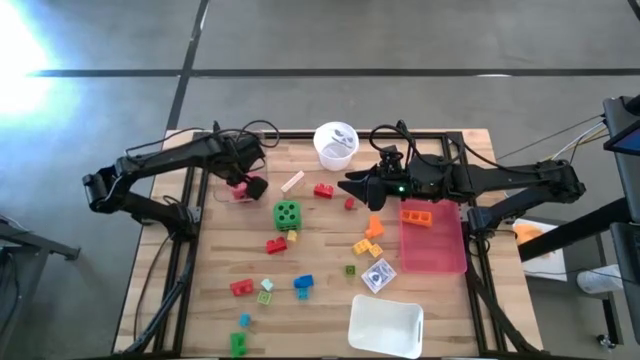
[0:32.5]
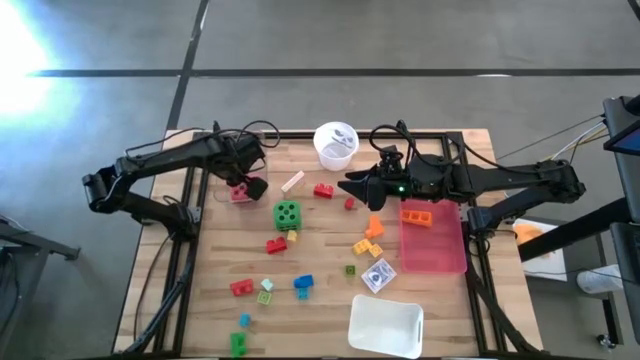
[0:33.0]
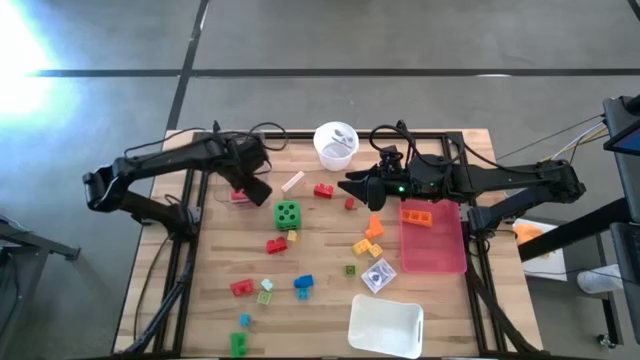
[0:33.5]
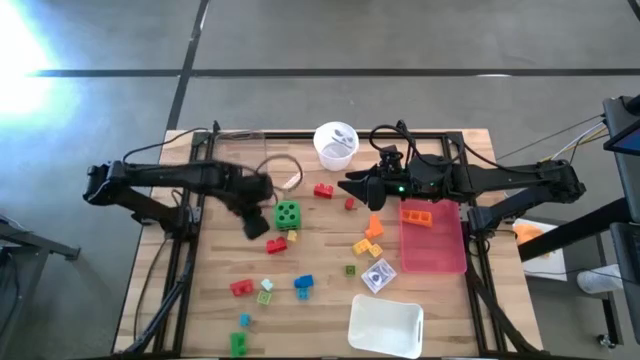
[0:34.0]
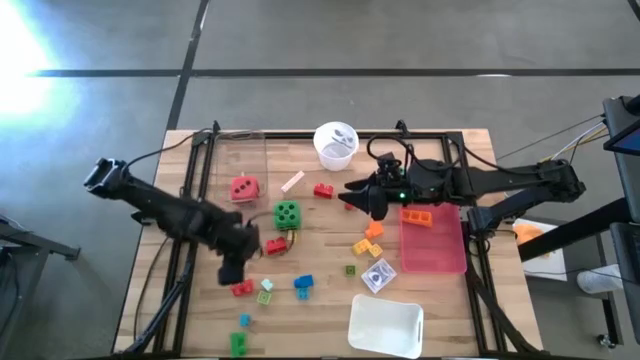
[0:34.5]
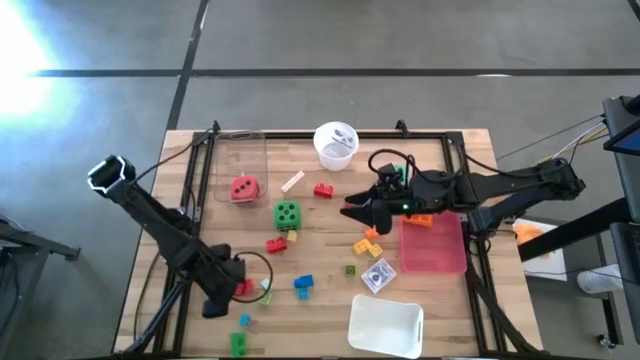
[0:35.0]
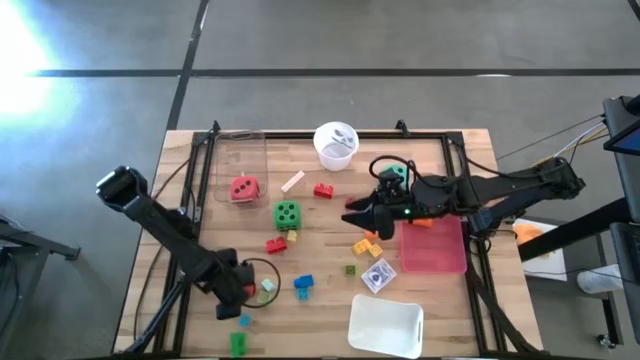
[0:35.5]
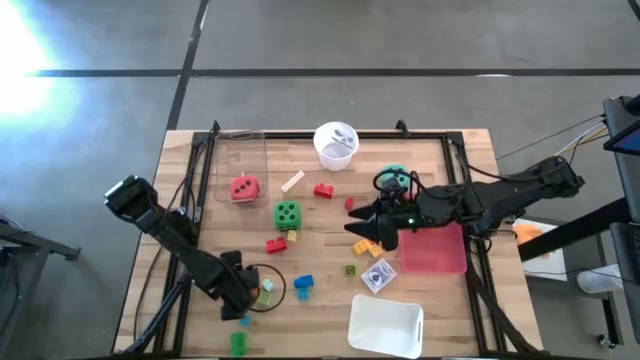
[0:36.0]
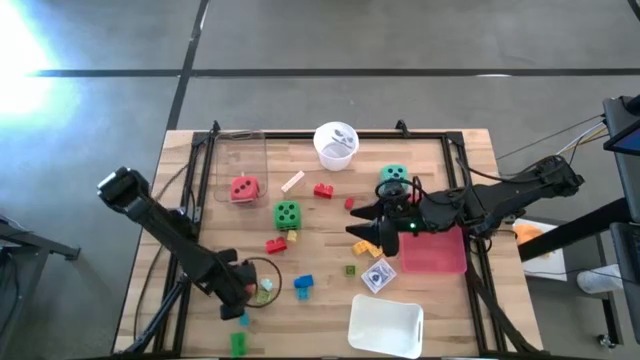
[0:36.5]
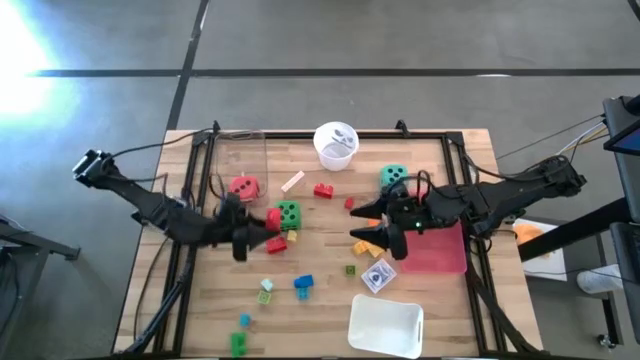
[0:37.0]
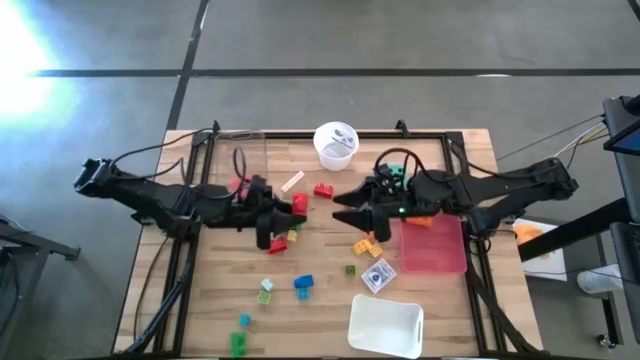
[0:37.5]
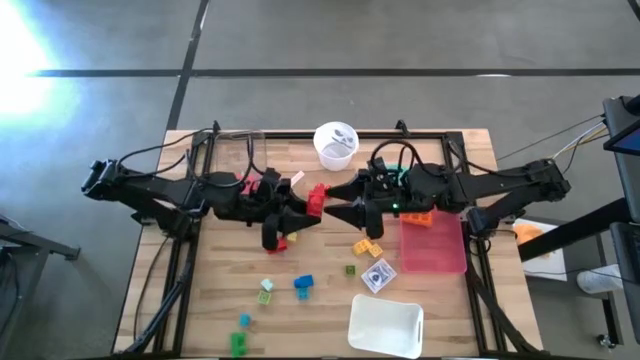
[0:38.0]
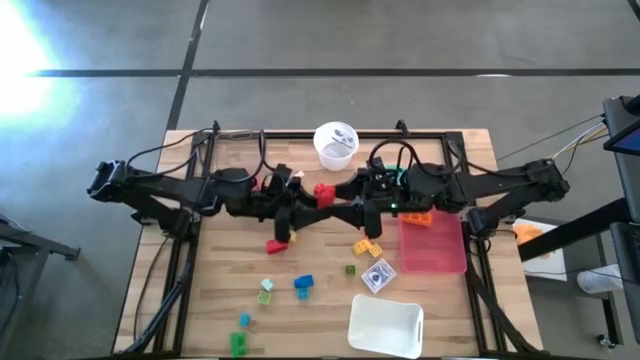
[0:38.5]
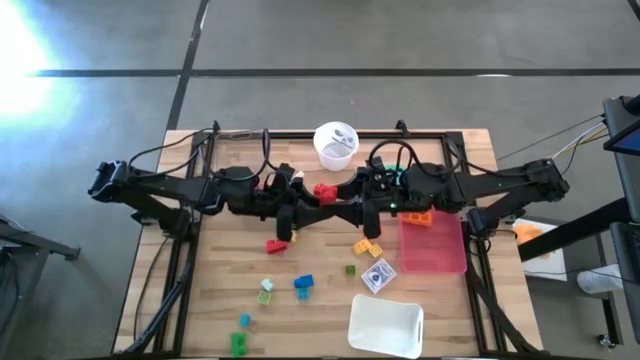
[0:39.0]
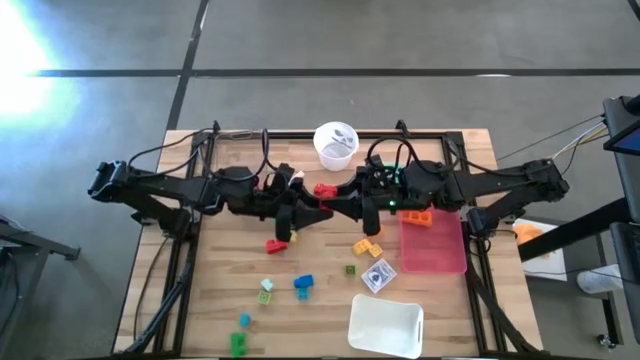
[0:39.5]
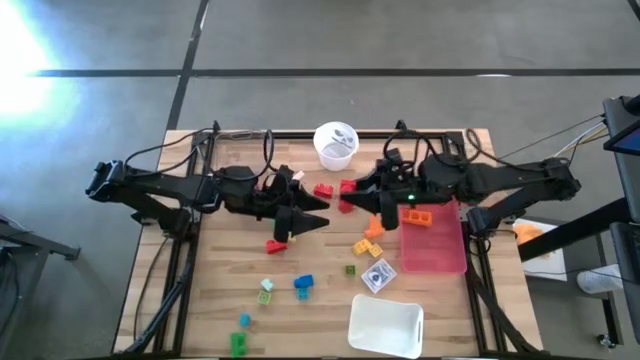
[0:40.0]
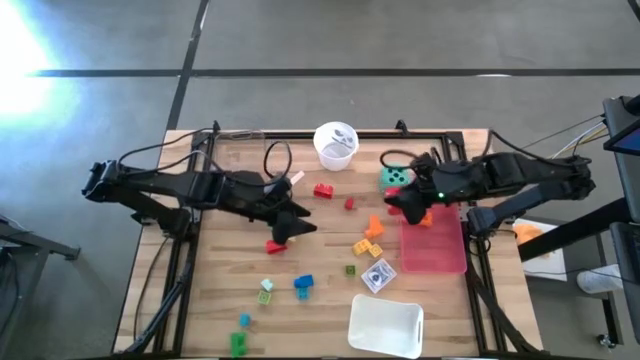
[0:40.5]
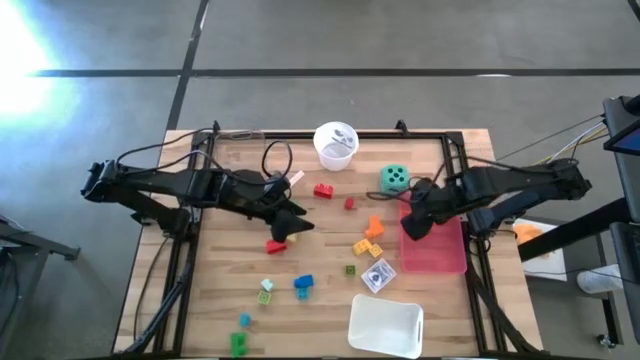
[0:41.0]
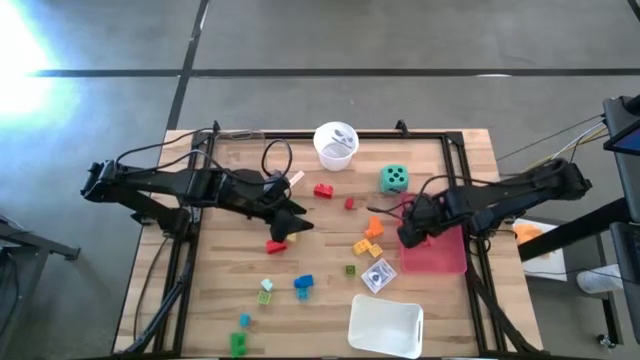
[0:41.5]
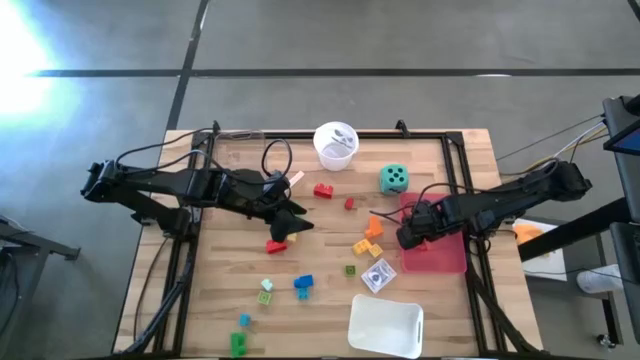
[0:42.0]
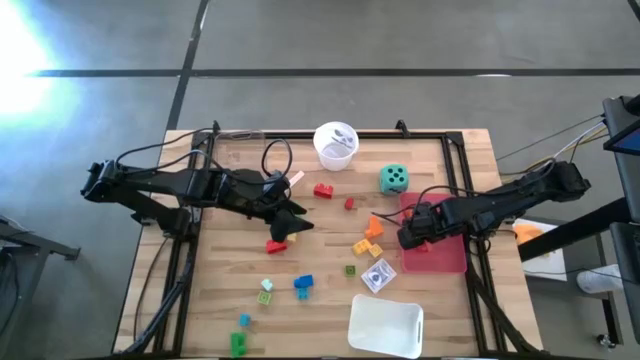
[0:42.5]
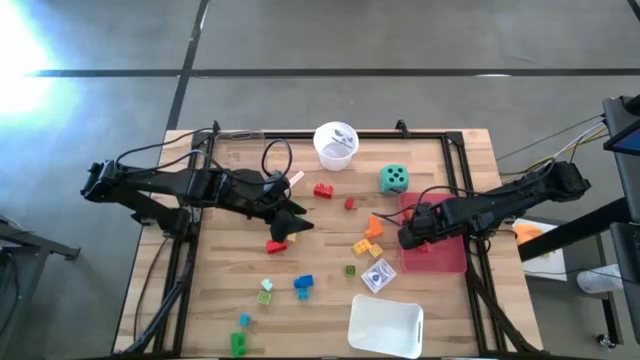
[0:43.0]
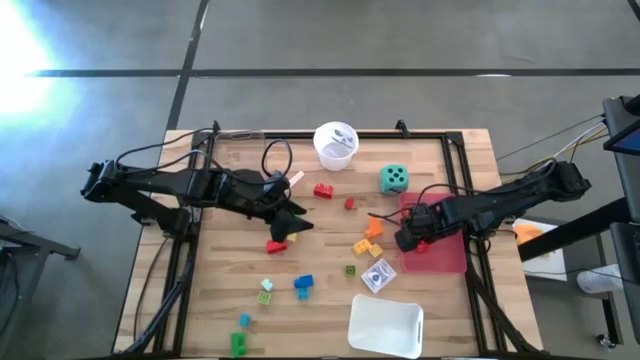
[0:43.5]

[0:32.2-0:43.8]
Task: Pick & Place Toys
Put the red game piece into the pink bin

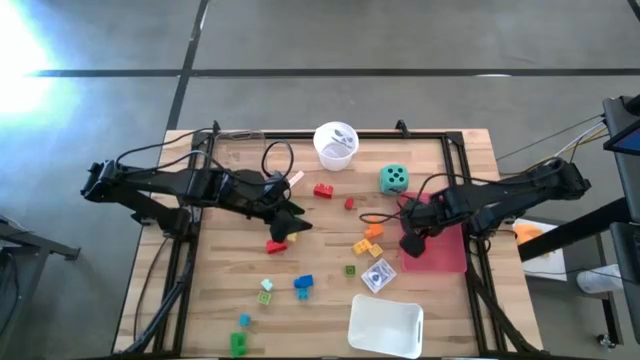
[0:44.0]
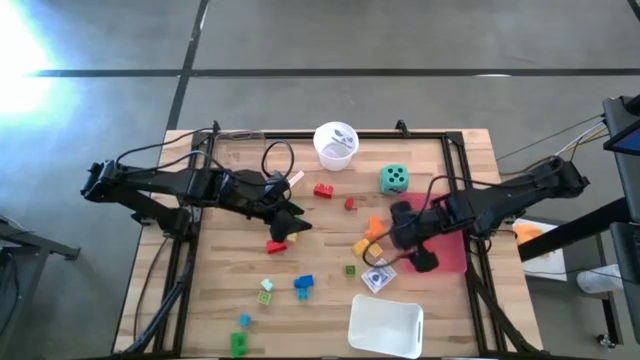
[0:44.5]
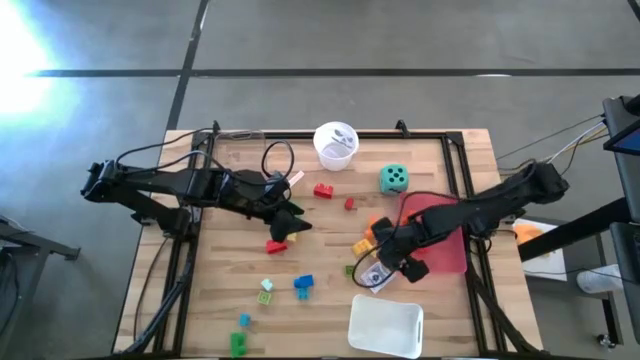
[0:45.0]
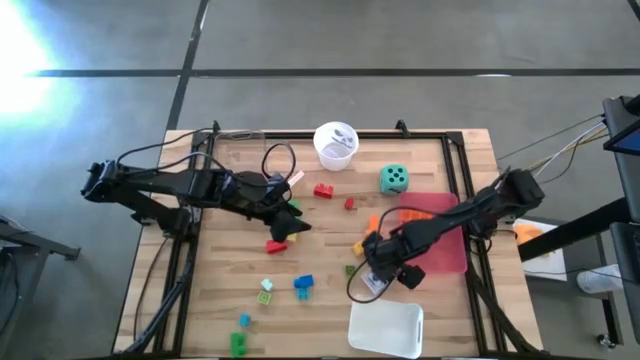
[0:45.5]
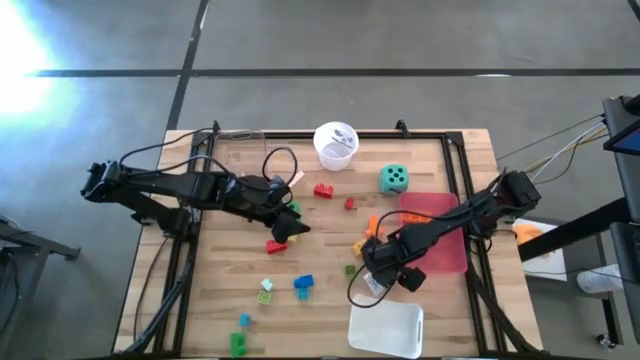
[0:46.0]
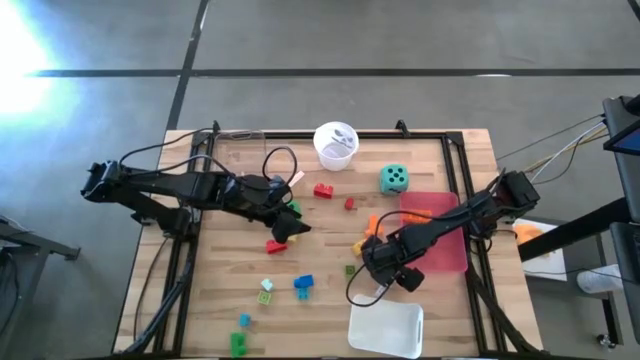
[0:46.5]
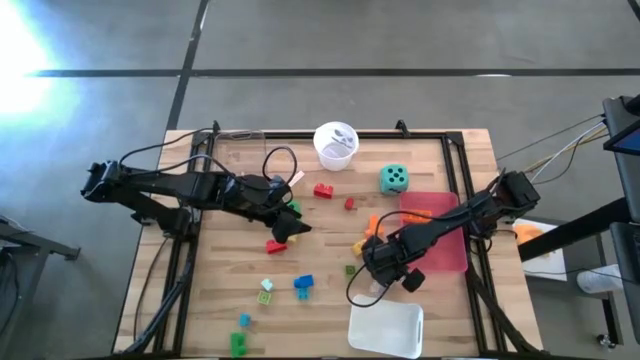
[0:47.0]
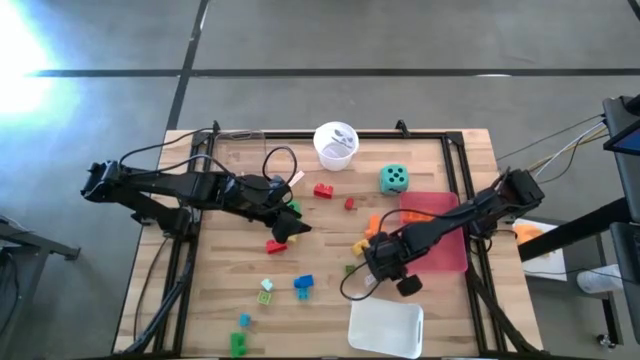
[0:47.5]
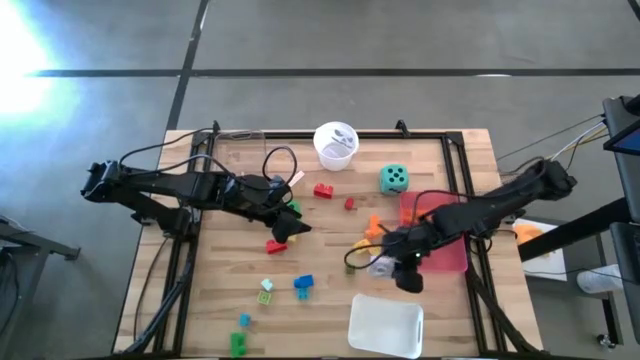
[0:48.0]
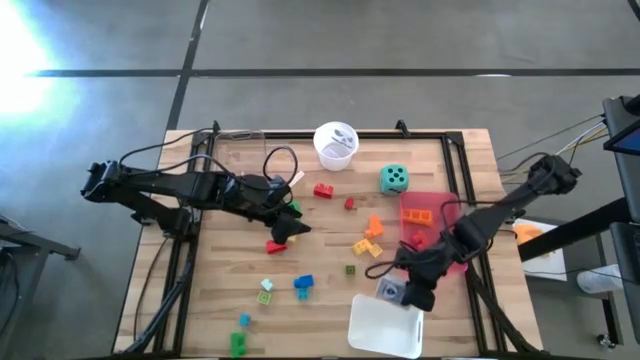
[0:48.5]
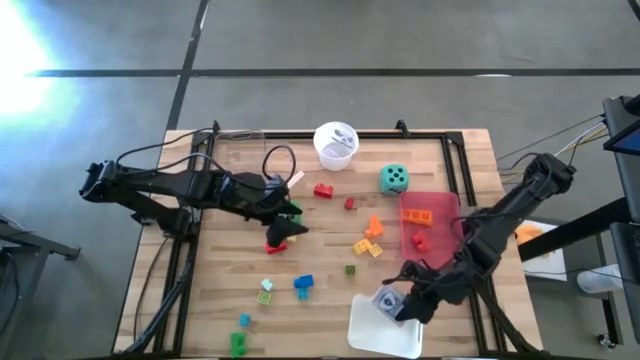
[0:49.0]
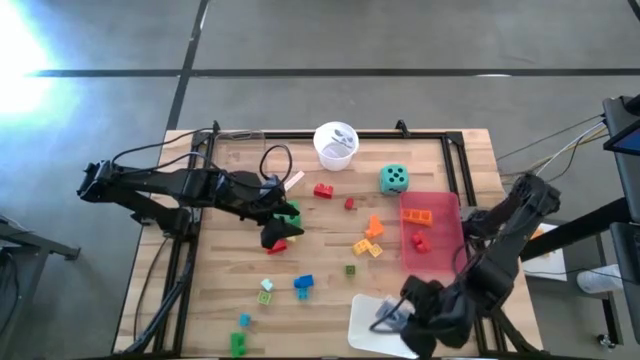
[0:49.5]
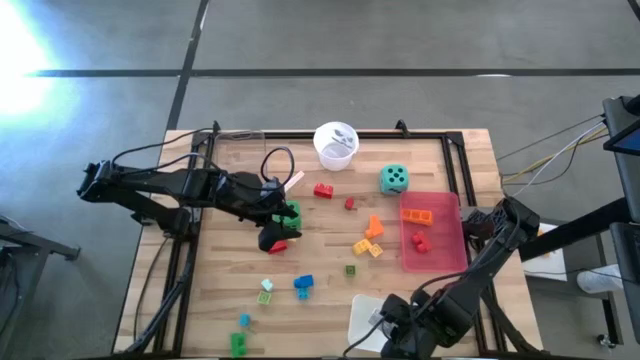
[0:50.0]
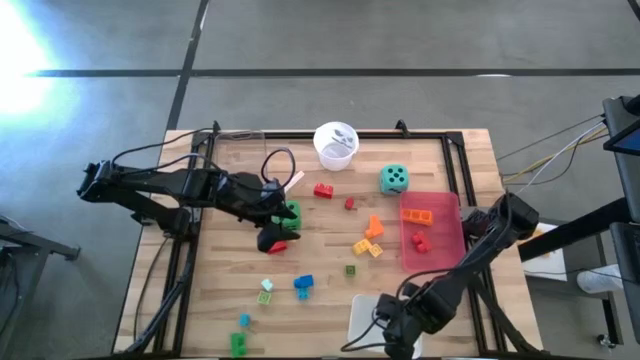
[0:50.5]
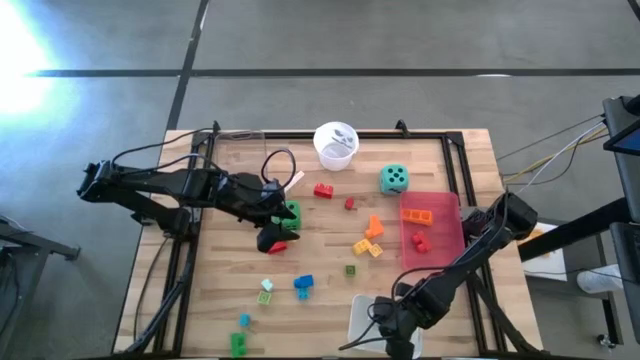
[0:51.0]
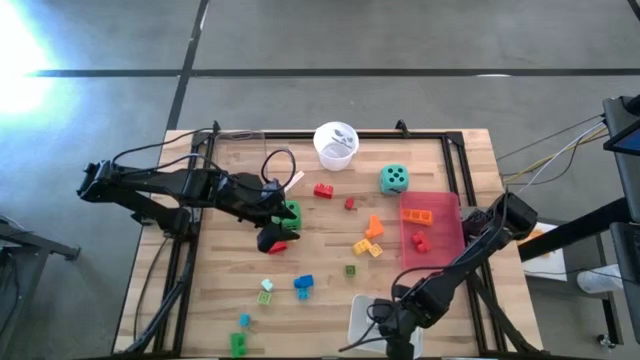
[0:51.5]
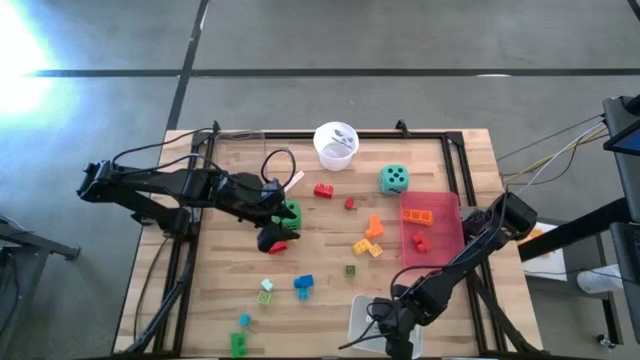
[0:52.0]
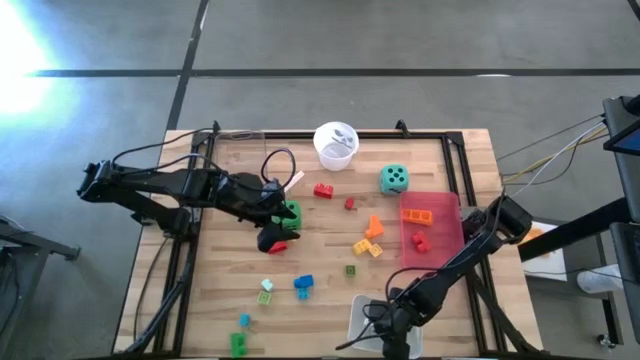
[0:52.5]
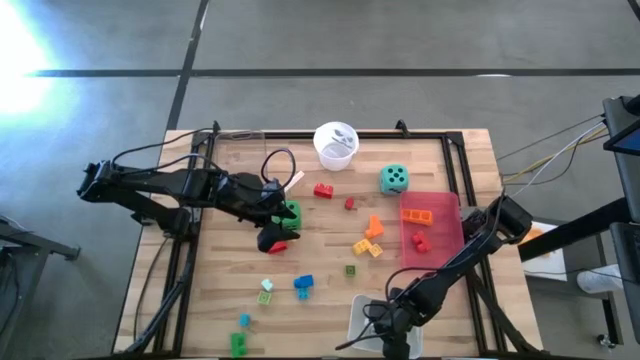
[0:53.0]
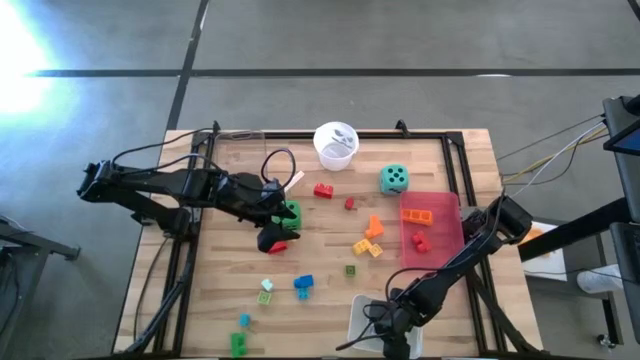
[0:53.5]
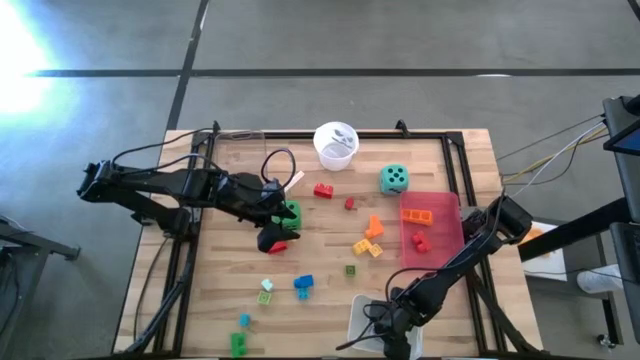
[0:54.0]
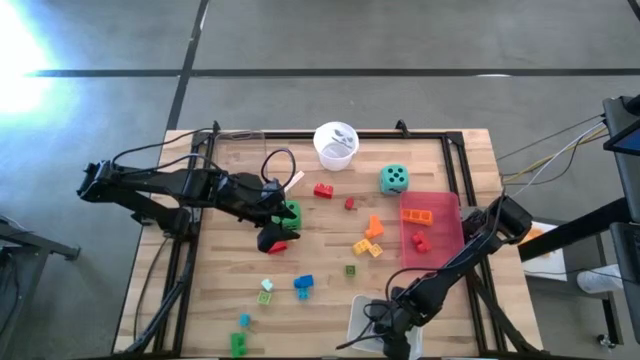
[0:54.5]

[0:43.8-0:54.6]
Put the blue deck of cards into the white bin

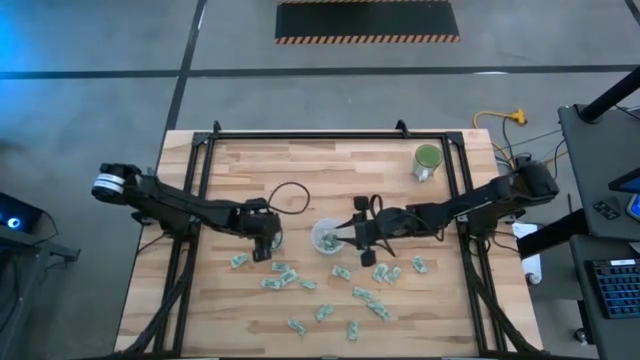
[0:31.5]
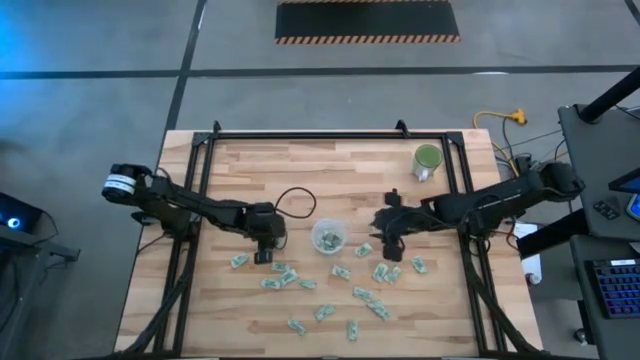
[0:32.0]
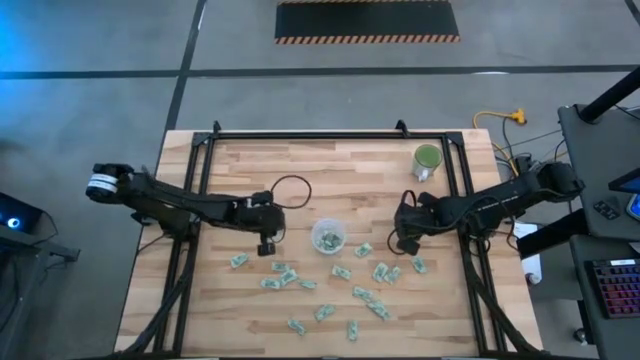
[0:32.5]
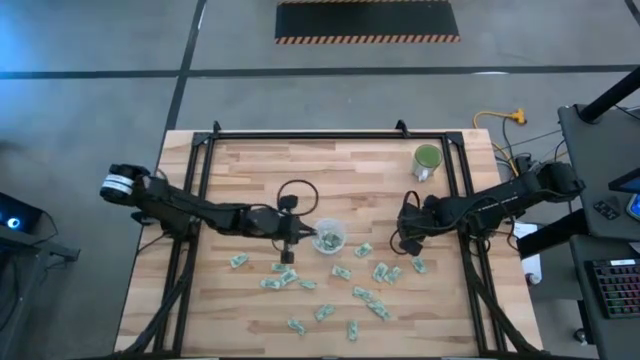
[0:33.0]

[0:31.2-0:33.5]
Task: Pick and place Stevia / Truvia into bins
Put the light green stevia packet into the transparent container
